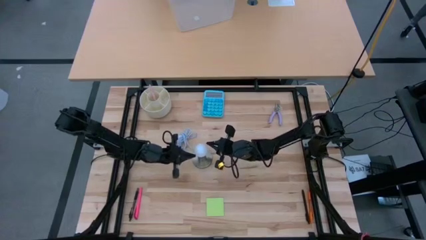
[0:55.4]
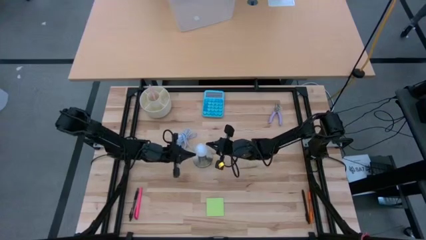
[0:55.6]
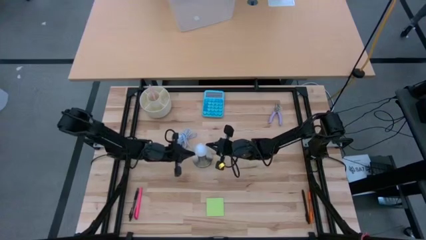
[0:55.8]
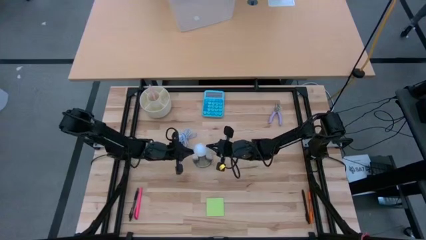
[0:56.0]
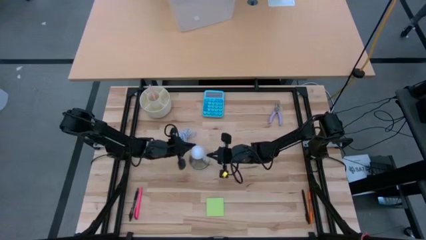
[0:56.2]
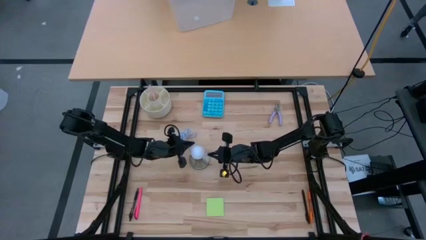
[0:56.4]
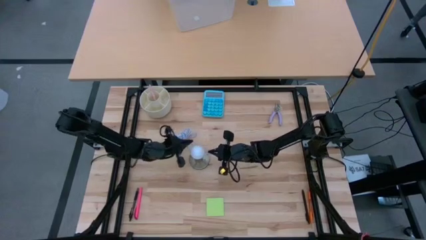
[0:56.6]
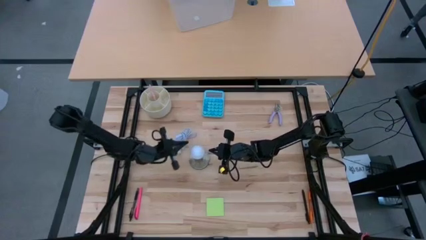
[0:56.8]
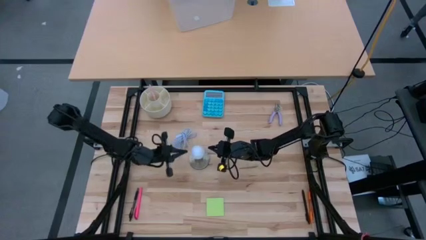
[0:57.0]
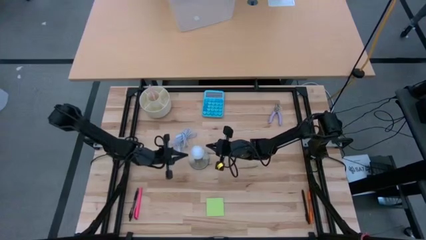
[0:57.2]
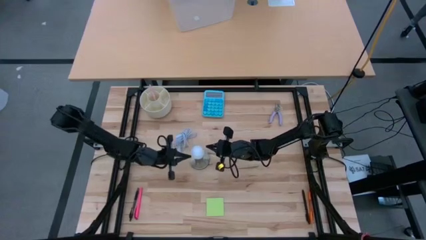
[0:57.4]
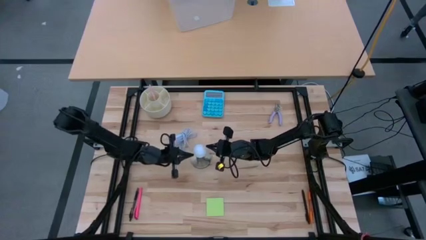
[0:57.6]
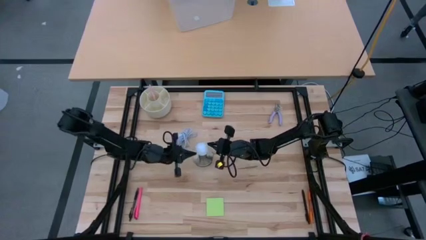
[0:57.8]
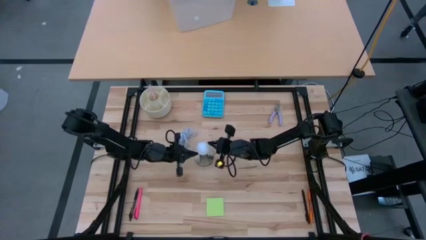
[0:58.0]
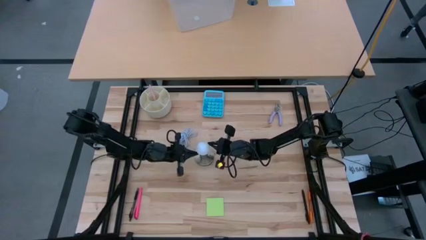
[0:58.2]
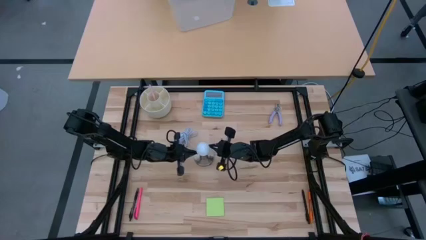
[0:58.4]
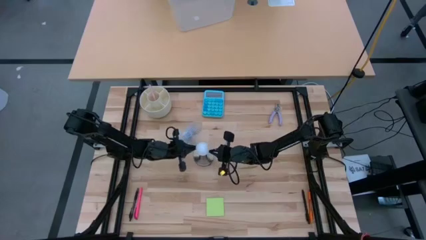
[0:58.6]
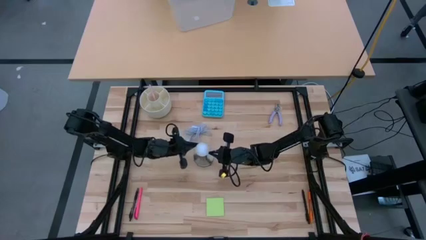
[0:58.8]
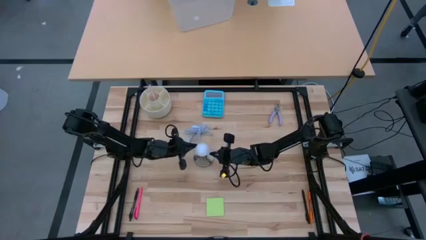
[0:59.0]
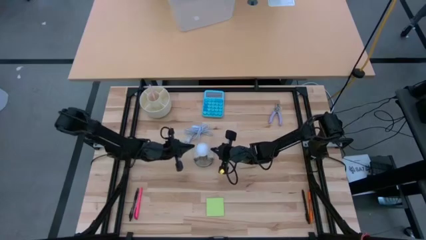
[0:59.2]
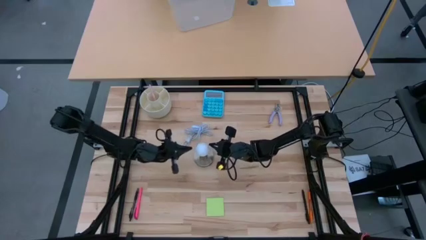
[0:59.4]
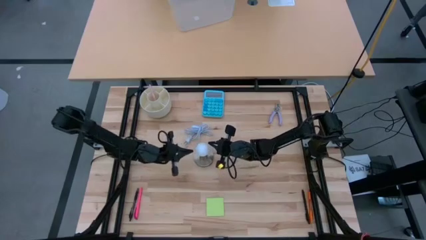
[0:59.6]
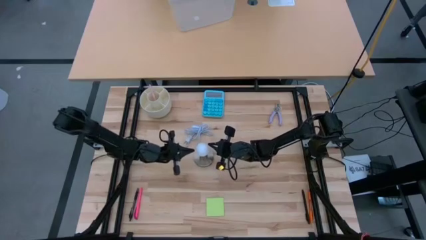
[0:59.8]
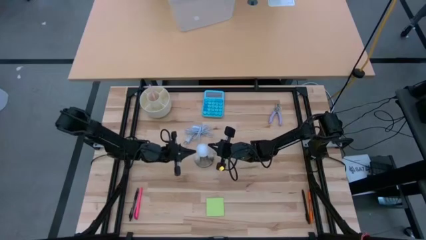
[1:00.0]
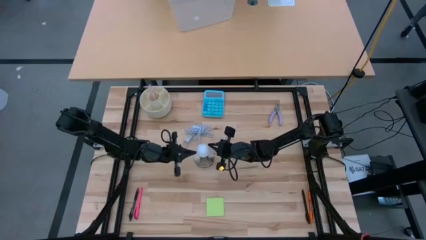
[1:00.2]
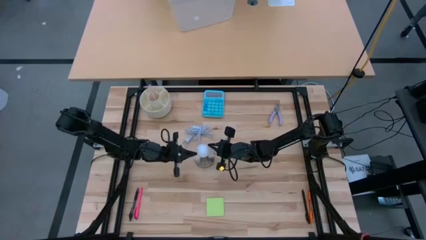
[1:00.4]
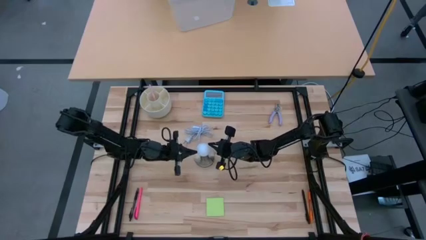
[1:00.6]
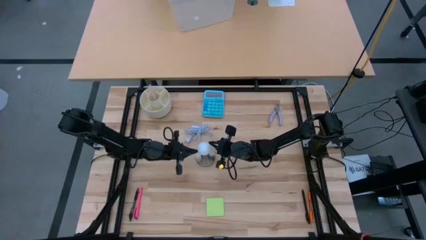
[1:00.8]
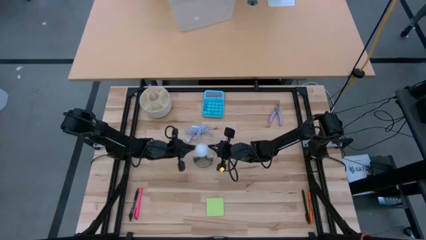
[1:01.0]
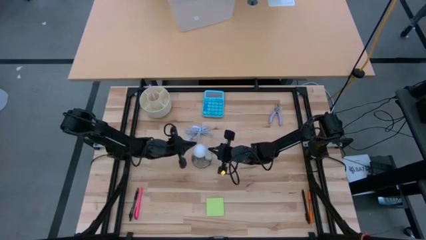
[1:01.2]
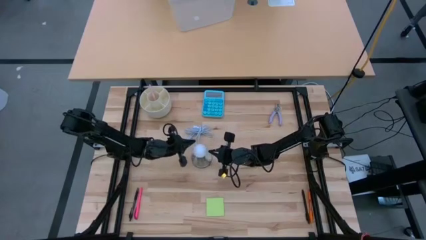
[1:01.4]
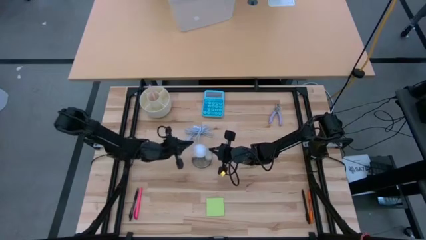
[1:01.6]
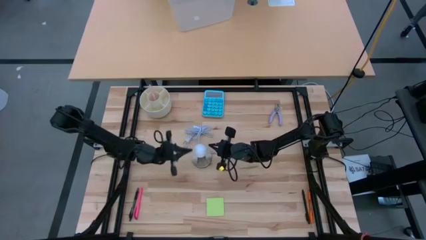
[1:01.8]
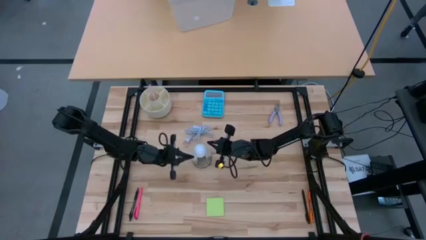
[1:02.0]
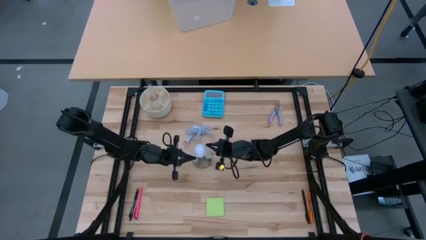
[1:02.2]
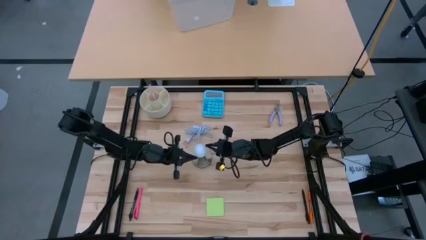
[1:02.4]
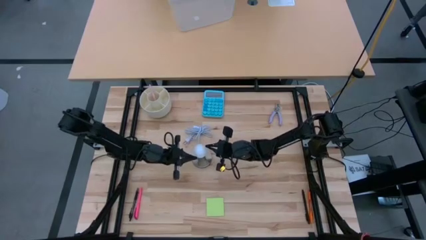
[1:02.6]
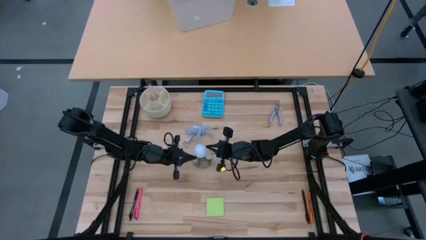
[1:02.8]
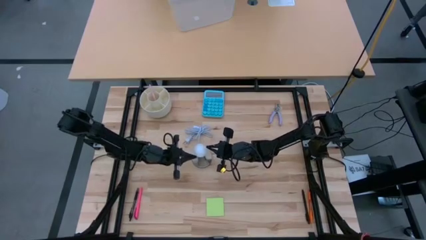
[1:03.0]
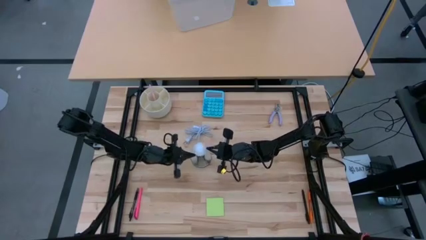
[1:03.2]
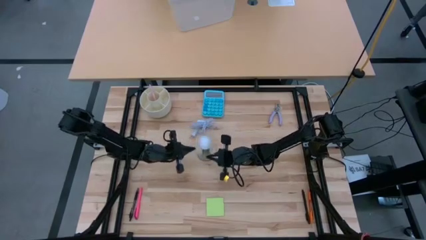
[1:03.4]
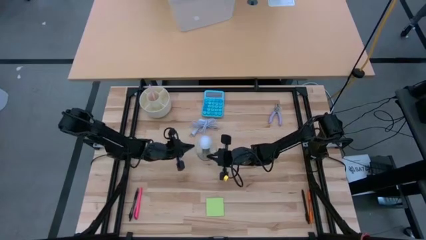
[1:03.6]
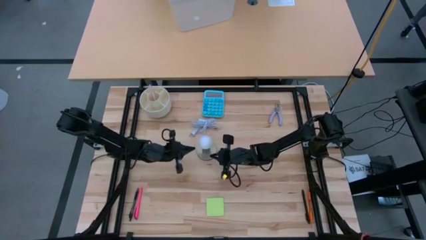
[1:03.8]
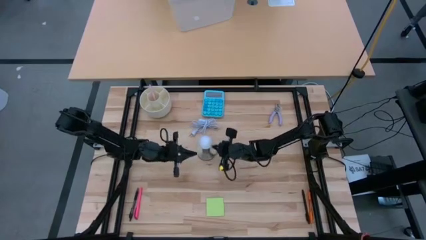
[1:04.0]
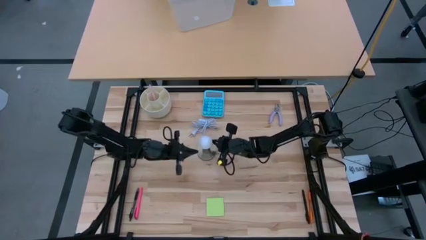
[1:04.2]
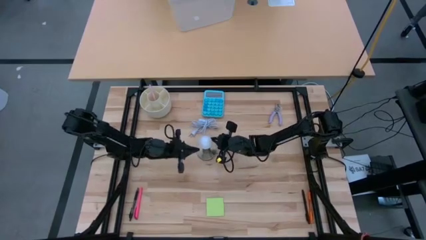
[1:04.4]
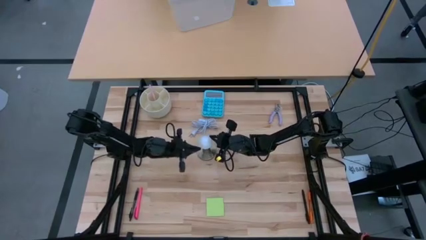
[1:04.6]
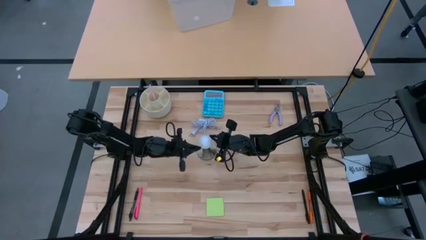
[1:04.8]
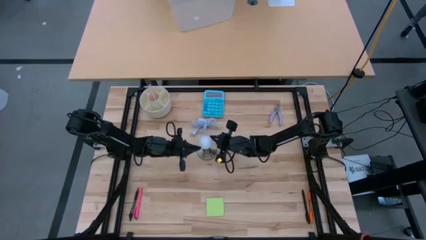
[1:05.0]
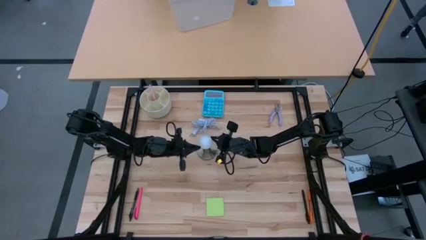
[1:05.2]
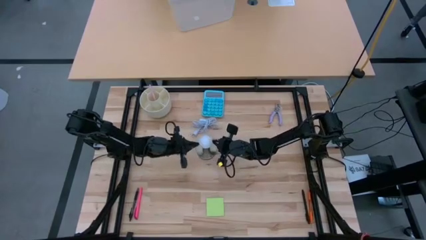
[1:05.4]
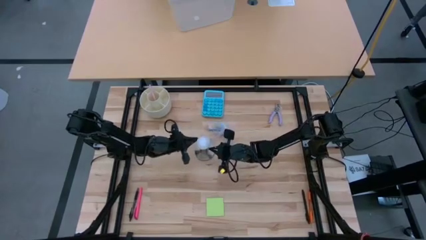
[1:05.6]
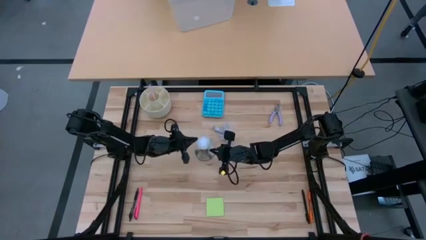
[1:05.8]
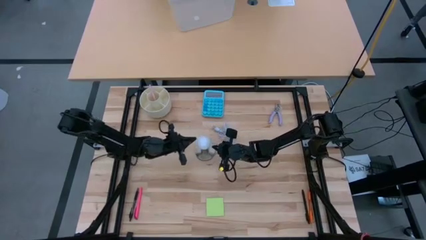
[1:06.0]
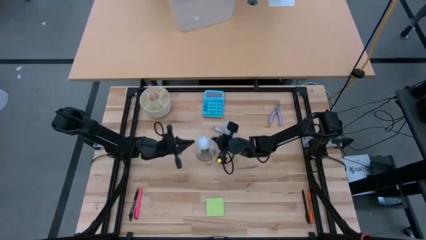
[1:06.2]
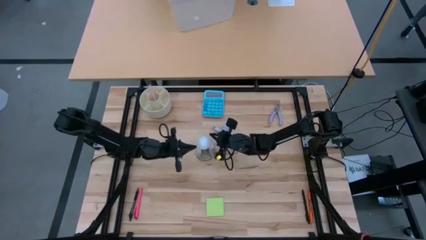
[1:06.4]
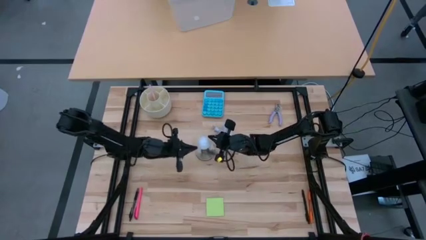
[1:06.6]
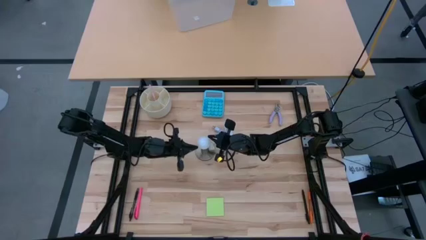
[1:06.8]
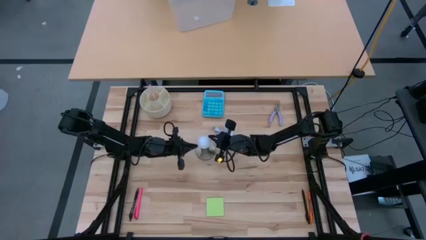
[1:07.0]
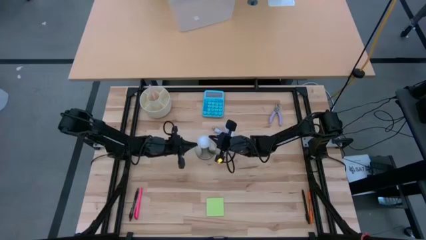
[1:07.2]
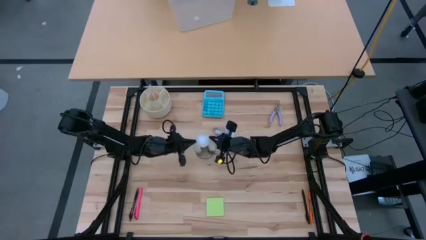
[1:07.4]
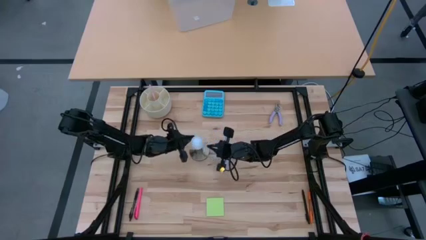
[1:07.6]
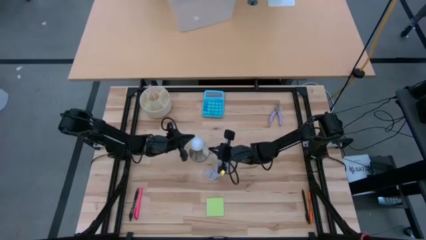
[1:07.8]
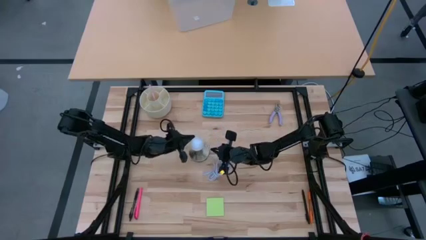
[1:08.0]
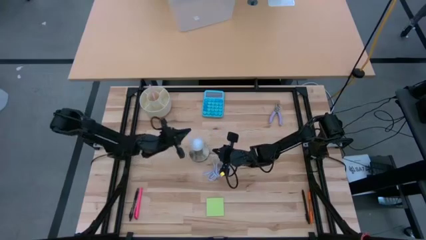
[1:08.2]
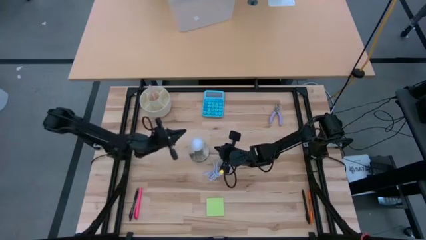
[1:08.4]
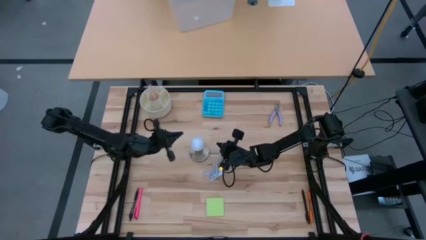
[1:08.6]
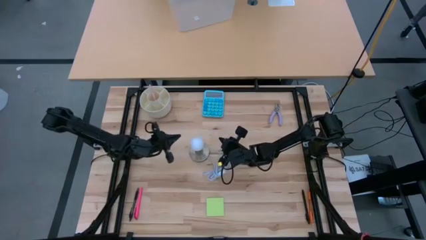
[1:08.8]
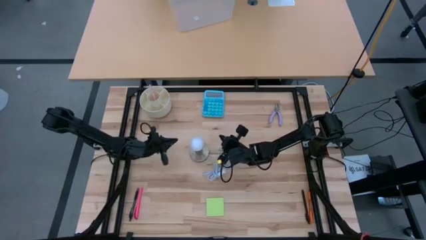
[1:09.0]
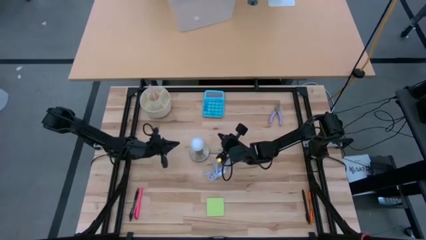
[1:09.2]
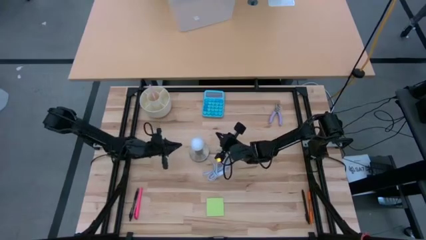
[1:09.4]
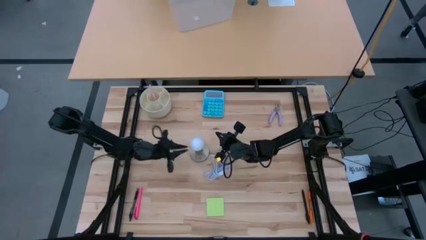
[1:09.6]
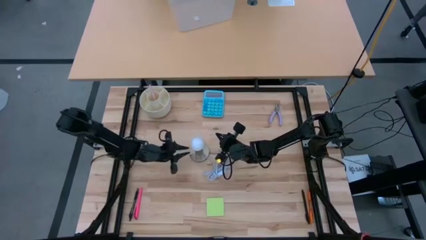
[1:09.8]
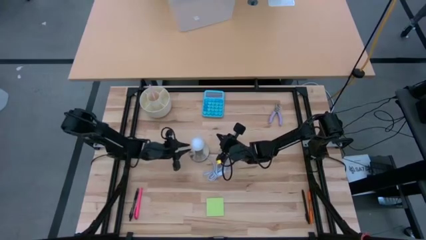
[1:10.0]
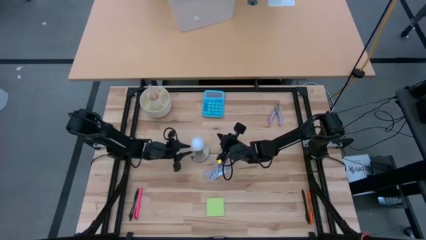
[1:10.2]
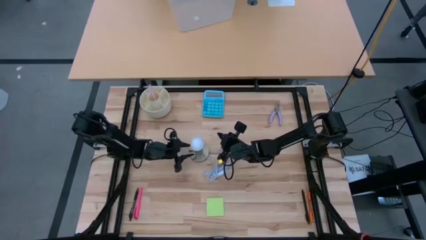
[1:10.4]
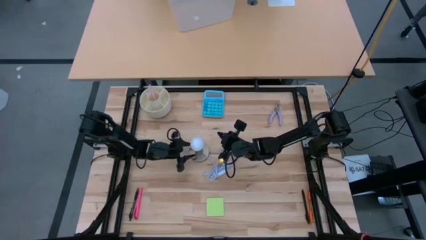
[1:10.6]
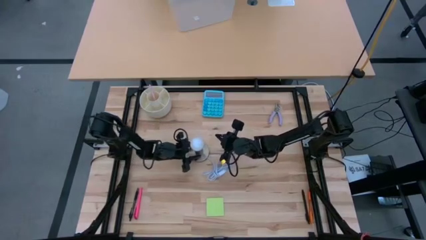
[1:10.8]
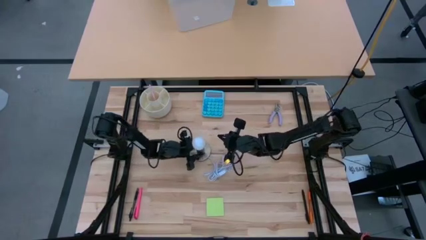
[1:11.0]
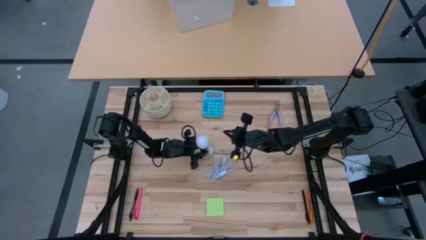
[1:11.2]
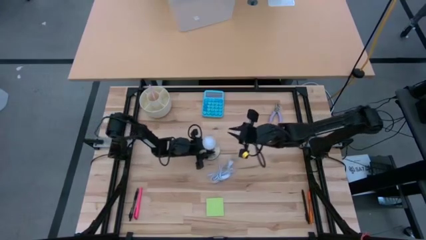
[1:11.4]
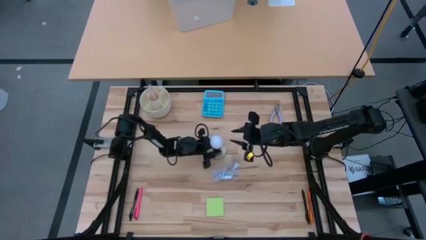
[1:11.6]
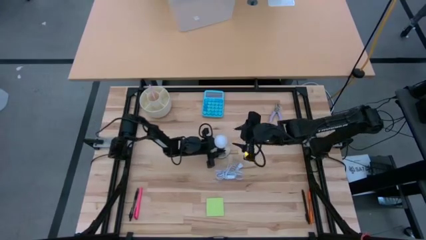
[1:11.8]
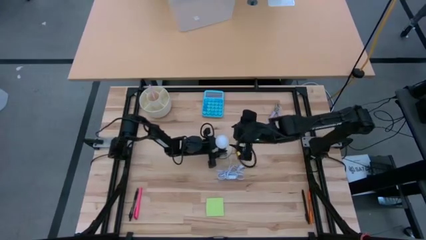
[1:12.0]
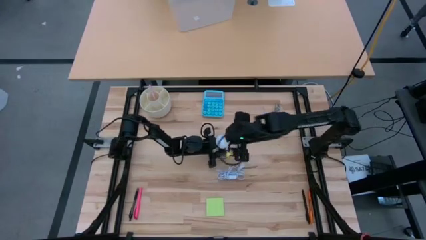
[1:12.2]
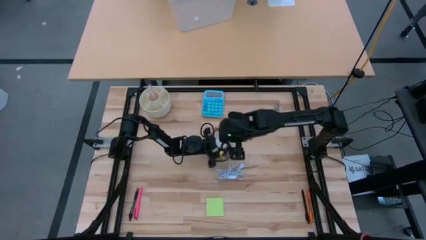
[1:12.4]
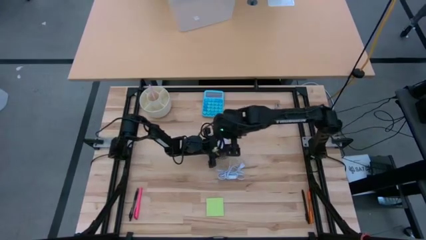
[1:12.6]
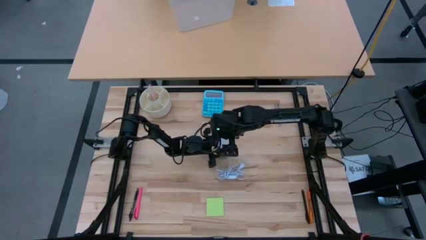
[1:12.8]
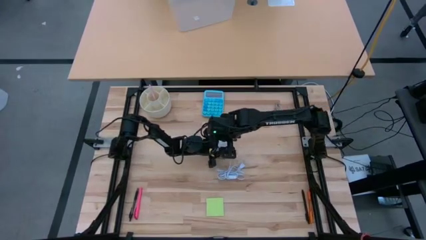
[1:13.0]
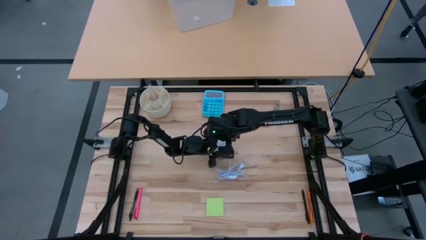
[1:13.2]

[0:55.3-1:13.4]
Task: Screw lightbulb
Insert the lightbulb into the lamp
